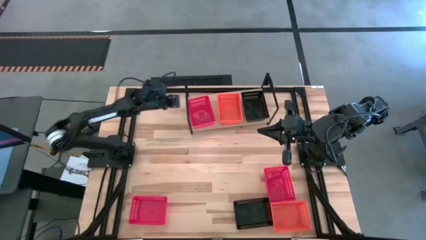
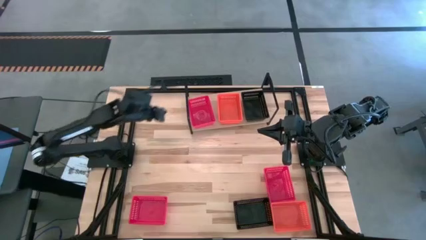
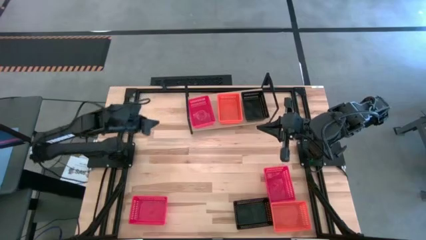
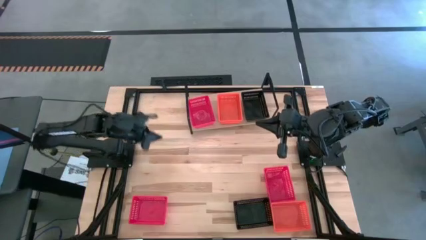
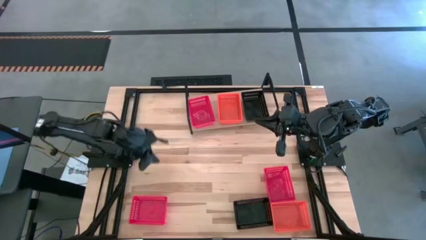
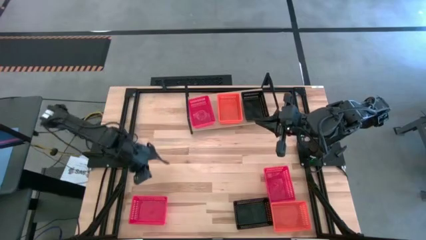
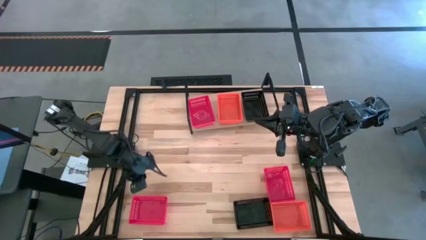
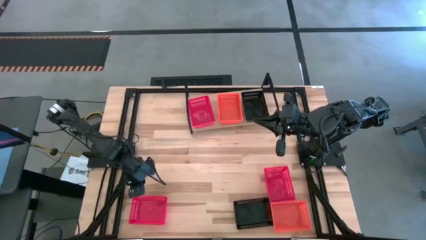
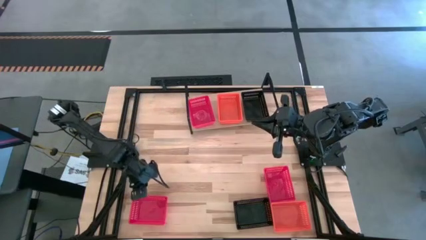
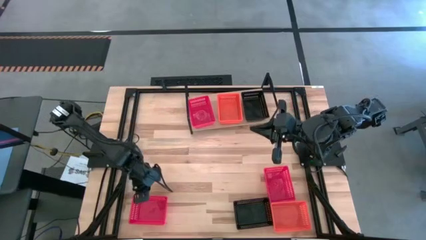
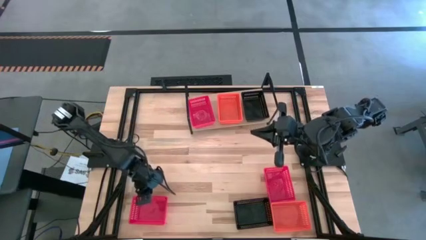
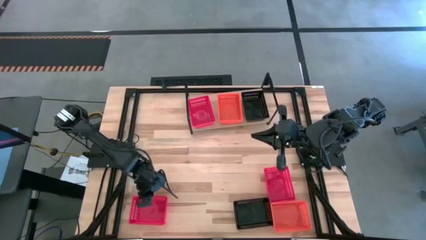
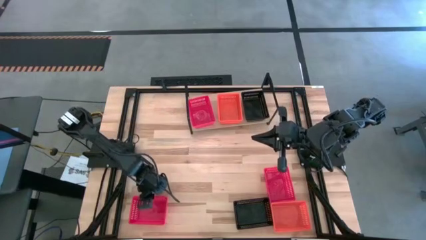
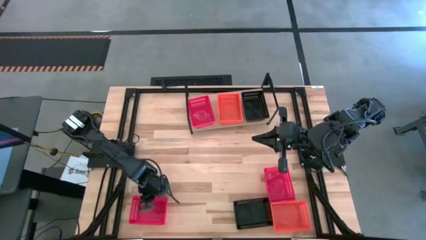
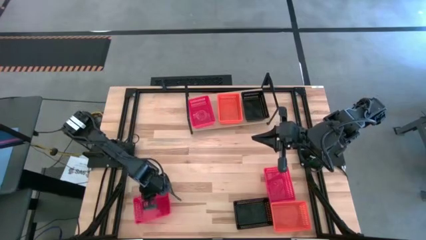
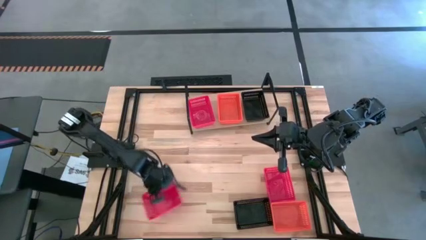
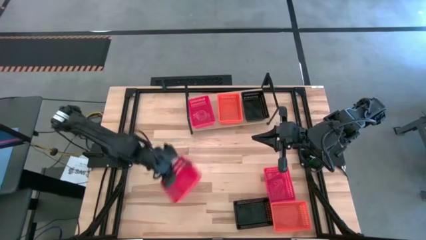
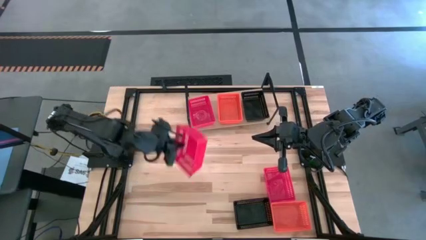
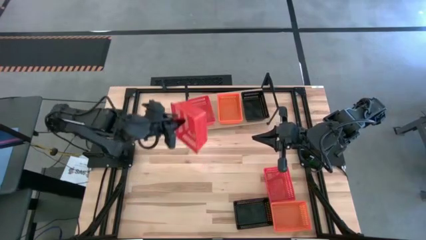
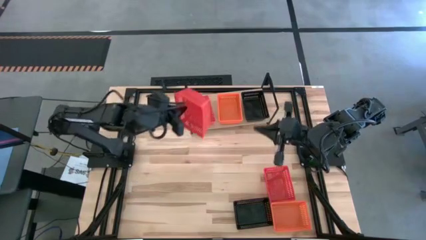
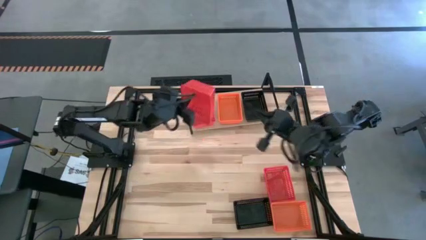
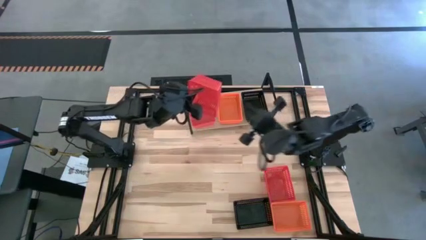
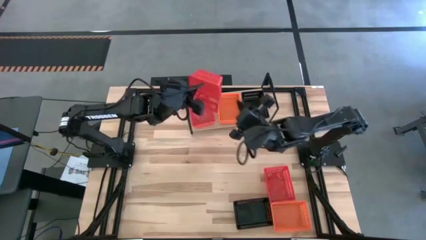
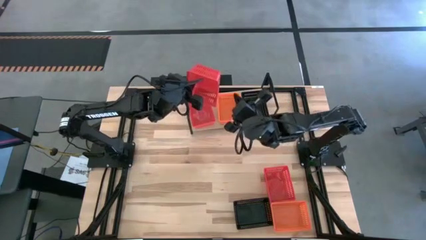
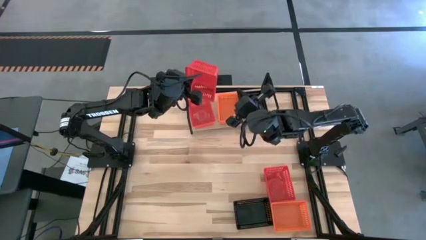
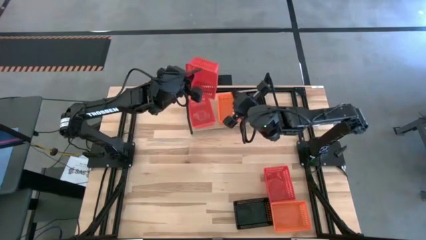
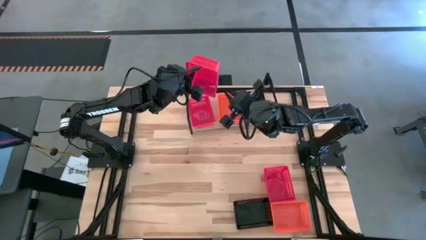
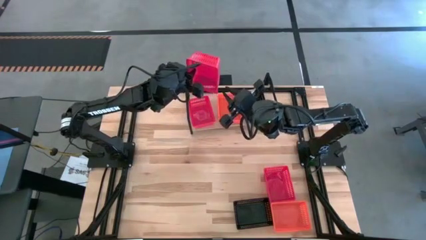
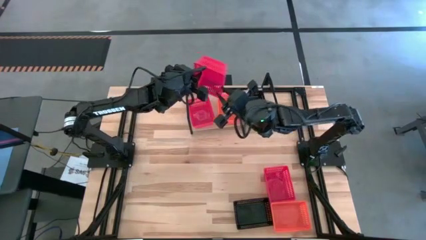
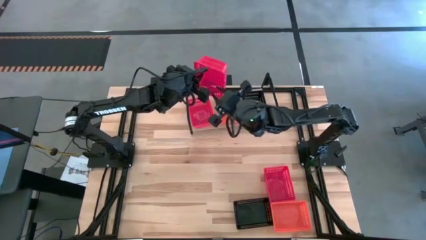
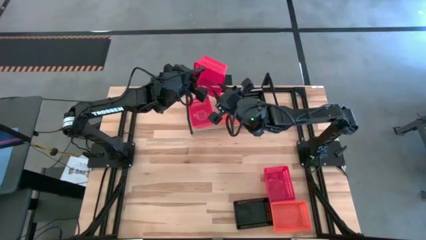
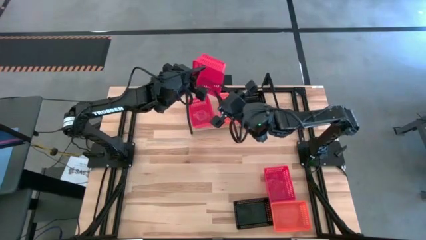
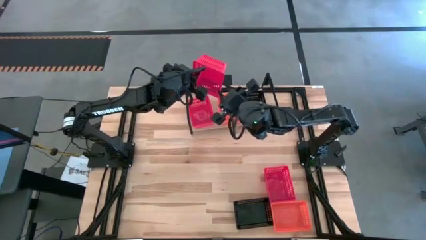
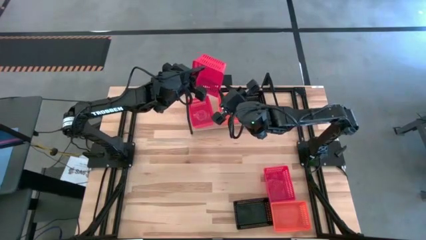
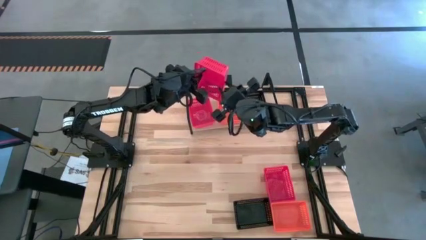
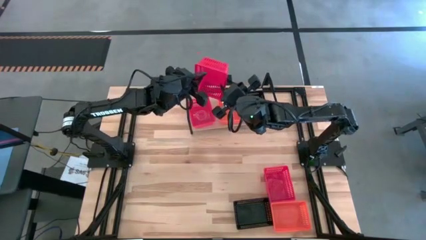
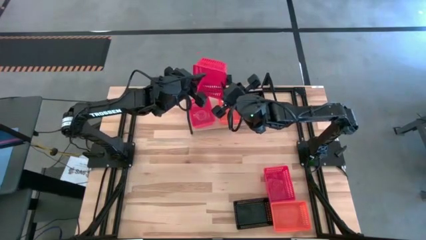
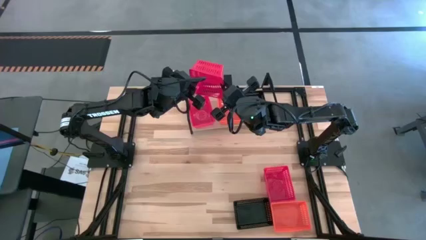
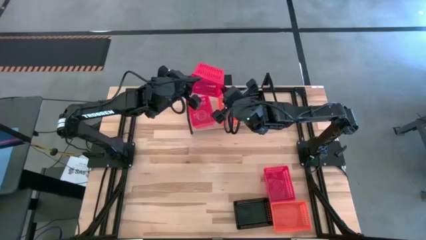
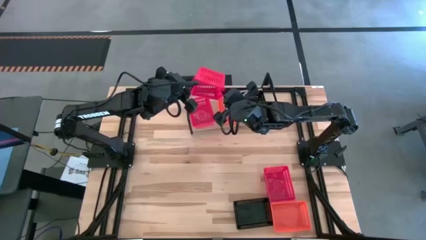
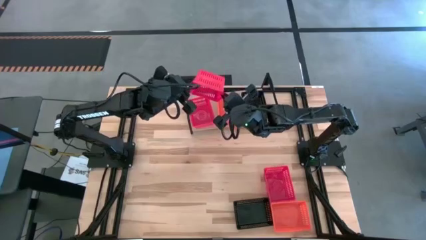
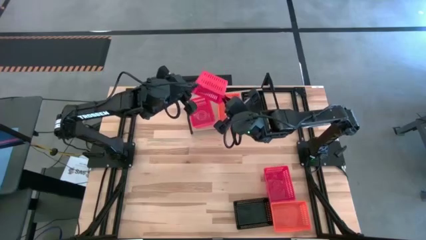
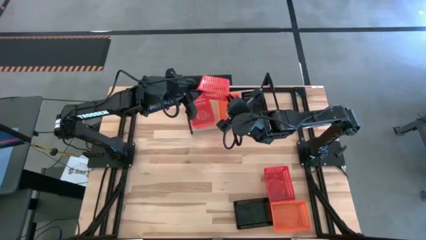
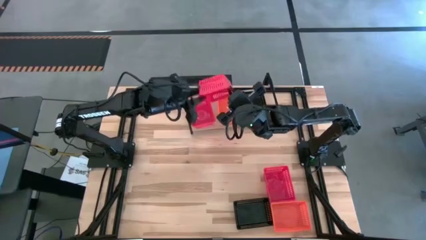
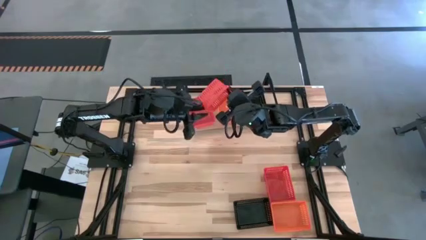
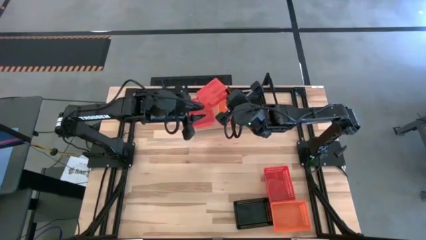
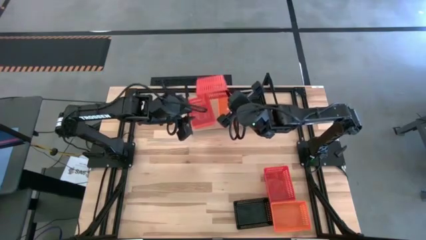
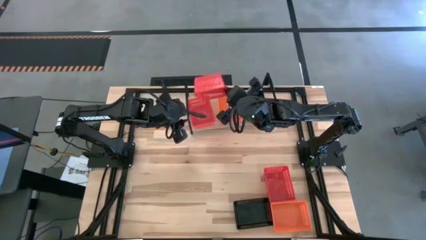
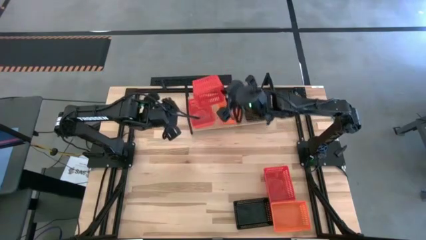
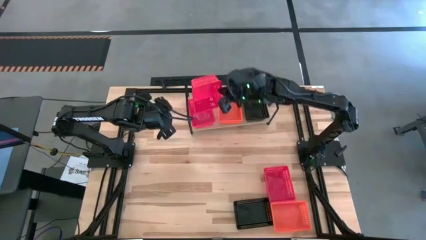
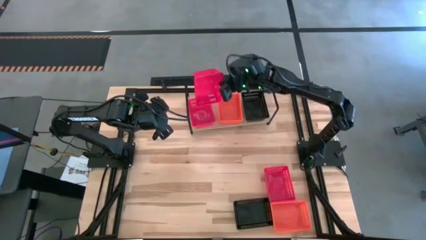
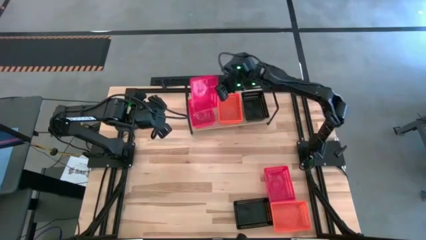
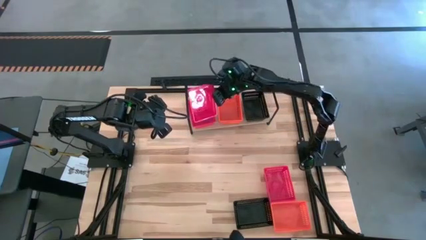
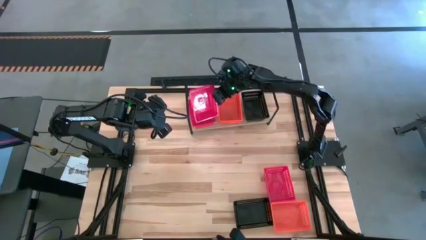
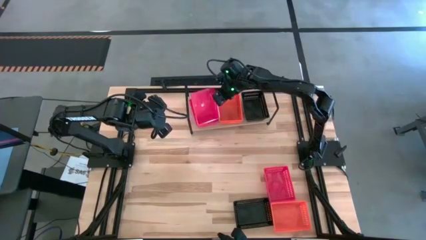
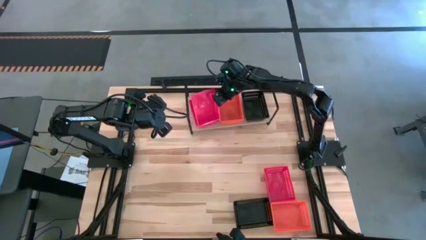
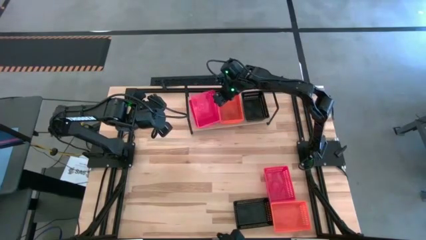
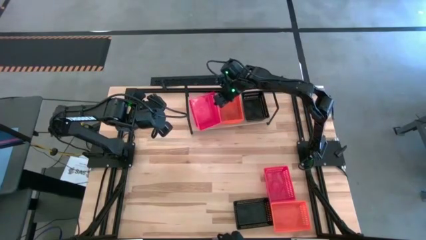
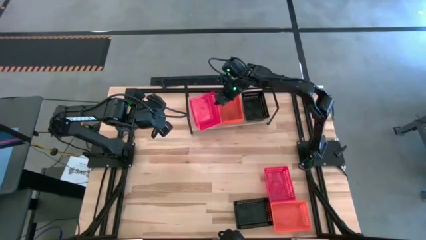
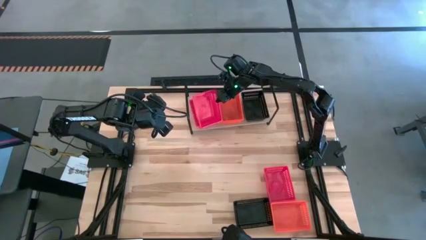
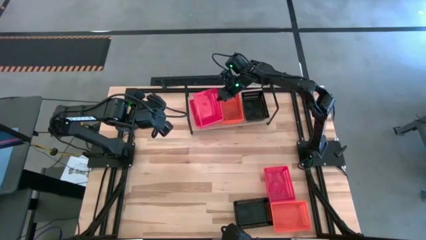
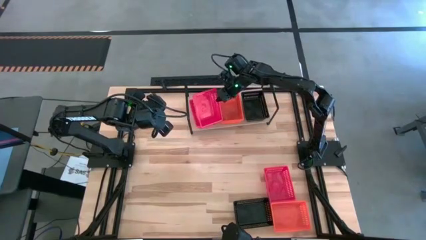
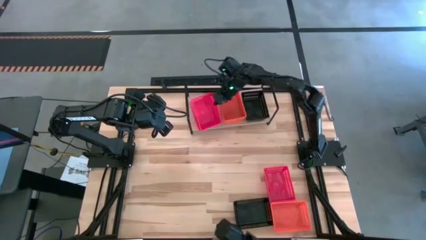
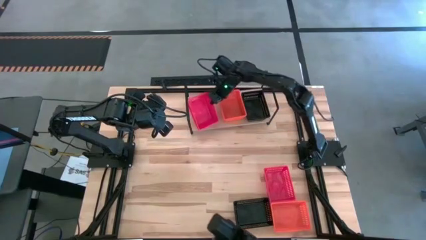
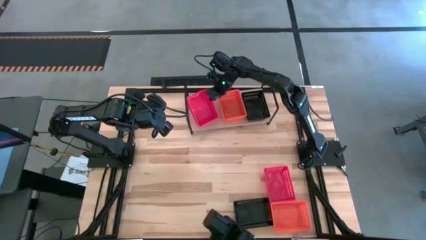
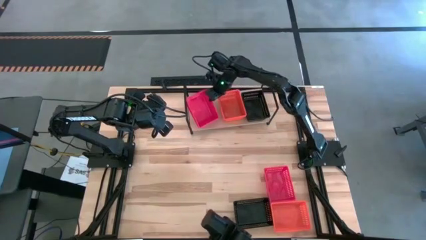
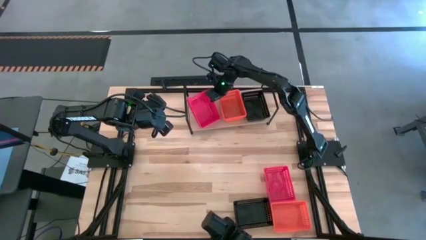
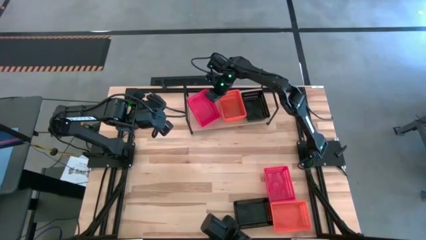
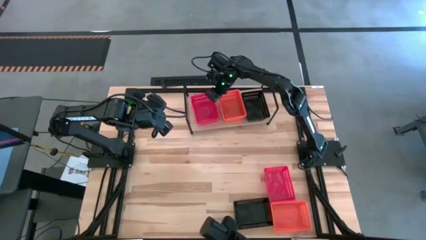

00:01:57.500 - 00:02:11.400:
Task: Stack baskets on shelf by color
Stack the left red bin into the red bin on the shelf
